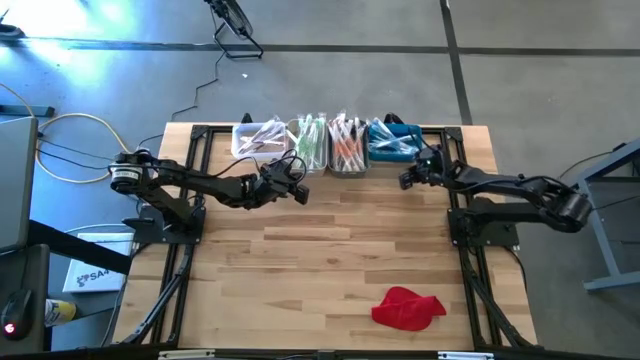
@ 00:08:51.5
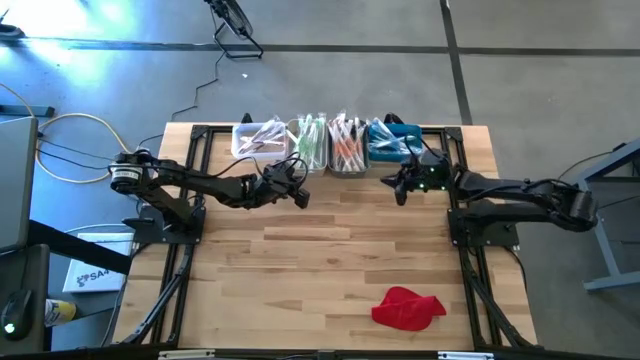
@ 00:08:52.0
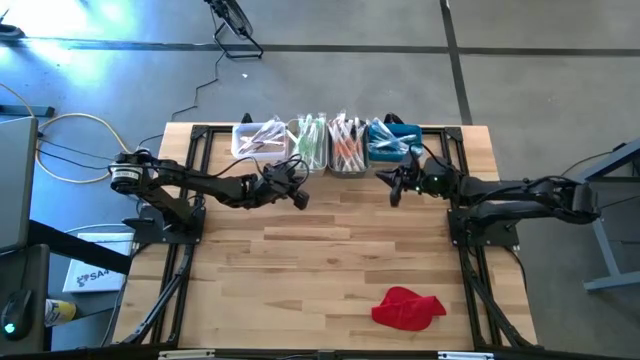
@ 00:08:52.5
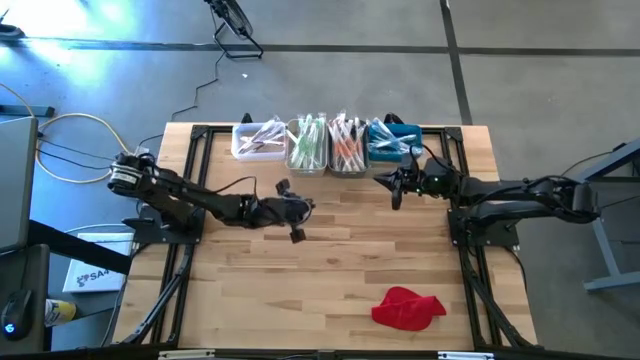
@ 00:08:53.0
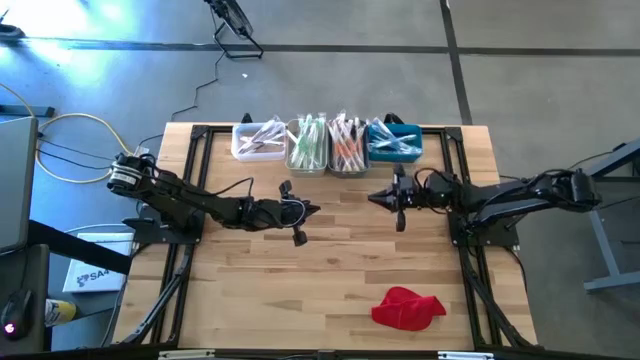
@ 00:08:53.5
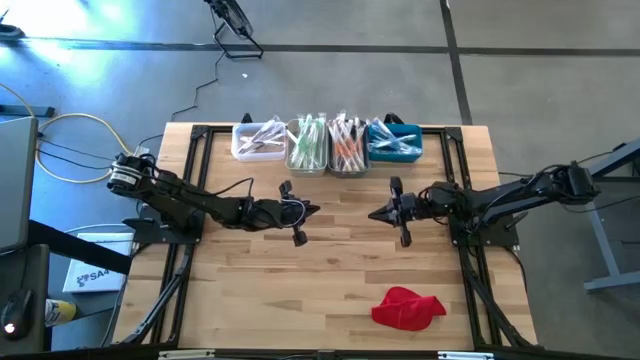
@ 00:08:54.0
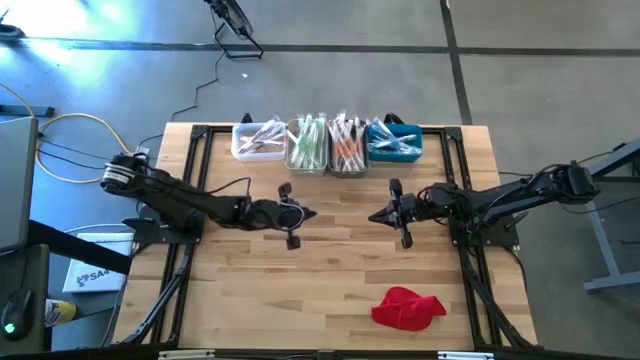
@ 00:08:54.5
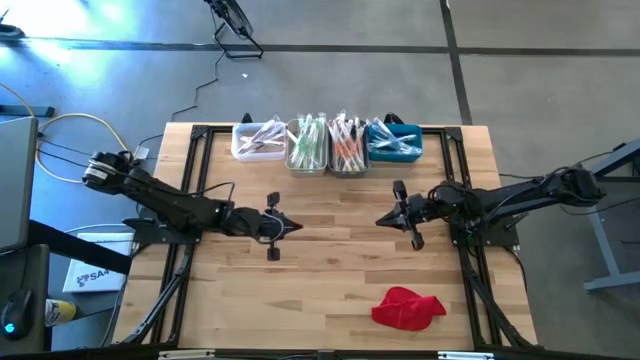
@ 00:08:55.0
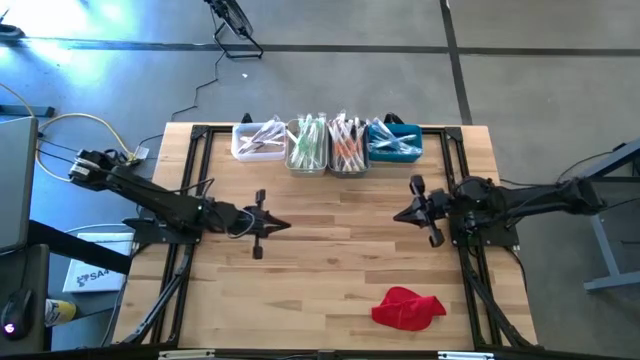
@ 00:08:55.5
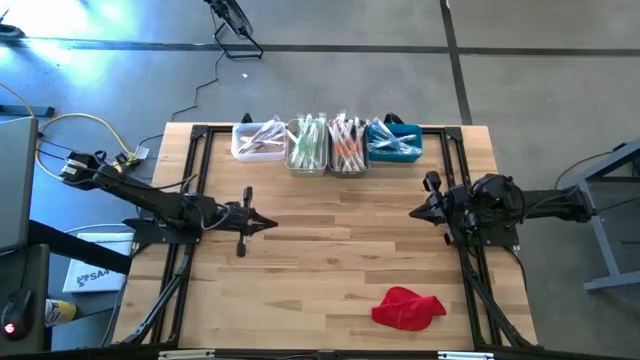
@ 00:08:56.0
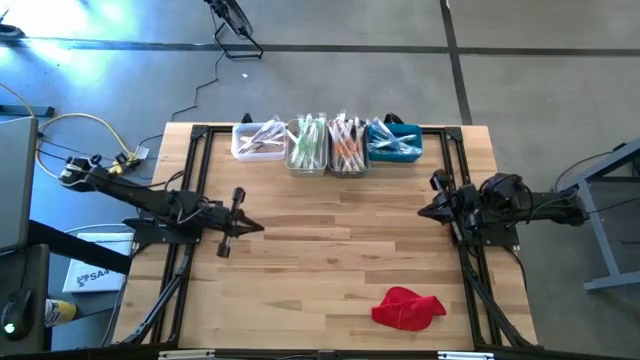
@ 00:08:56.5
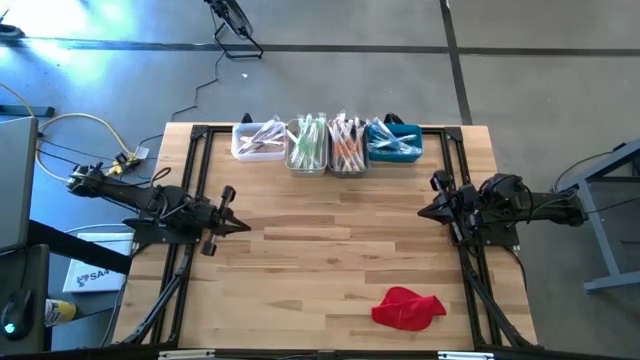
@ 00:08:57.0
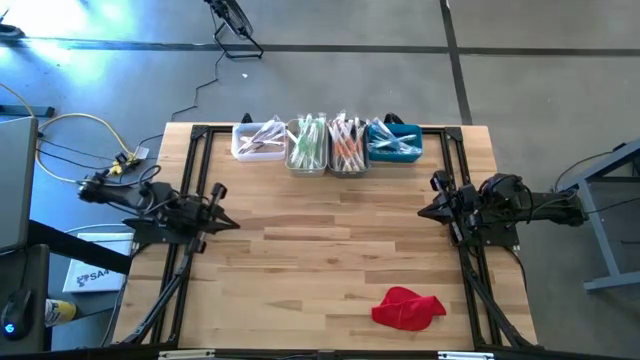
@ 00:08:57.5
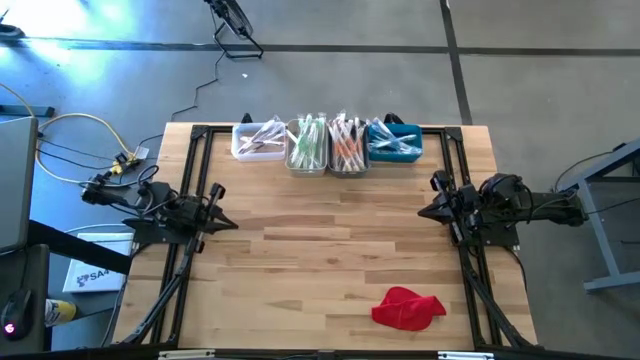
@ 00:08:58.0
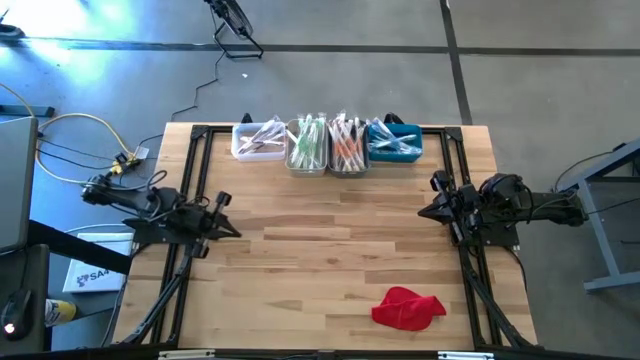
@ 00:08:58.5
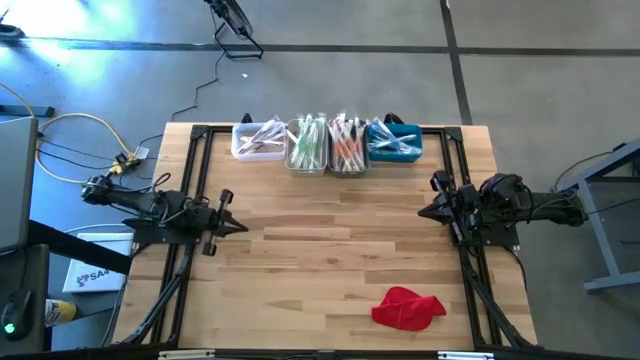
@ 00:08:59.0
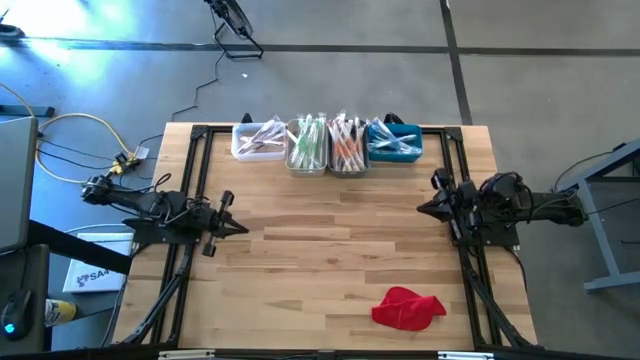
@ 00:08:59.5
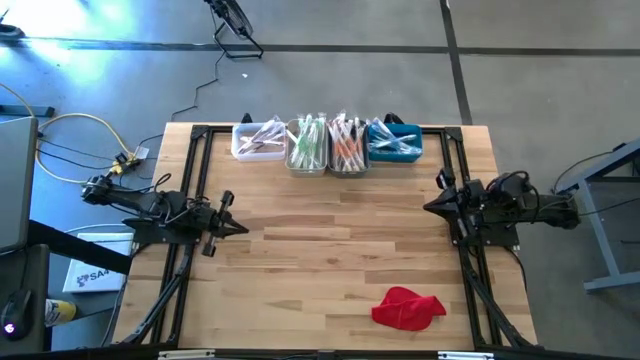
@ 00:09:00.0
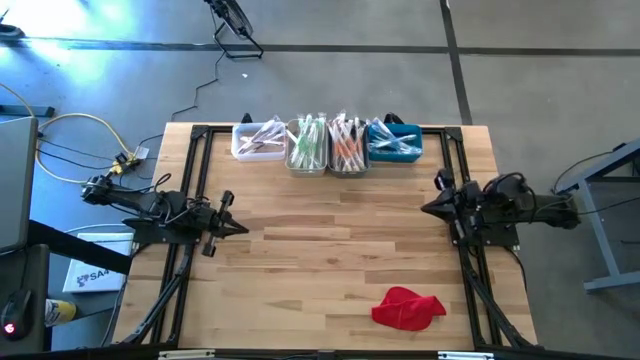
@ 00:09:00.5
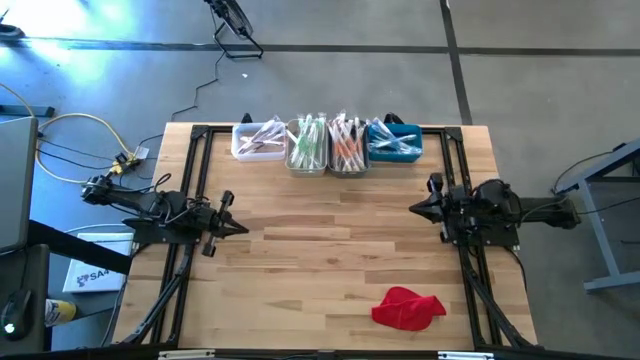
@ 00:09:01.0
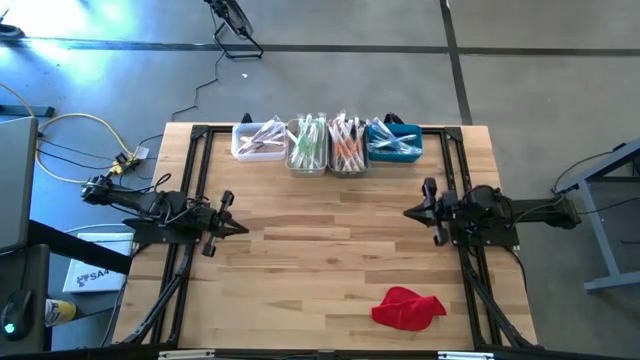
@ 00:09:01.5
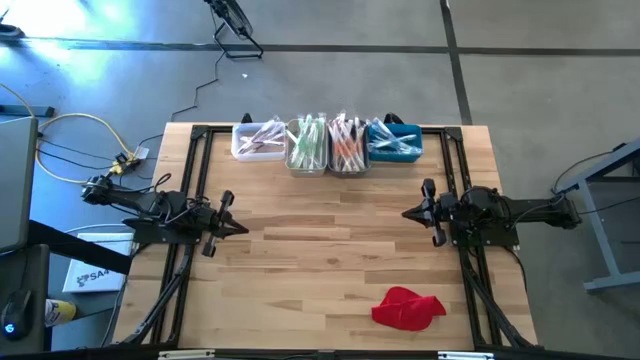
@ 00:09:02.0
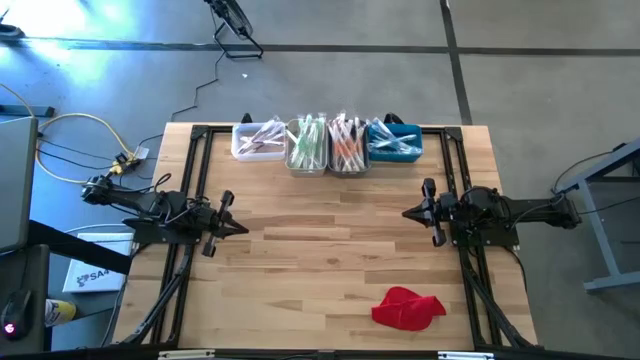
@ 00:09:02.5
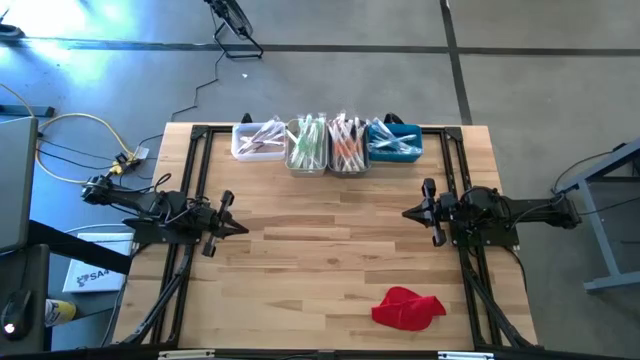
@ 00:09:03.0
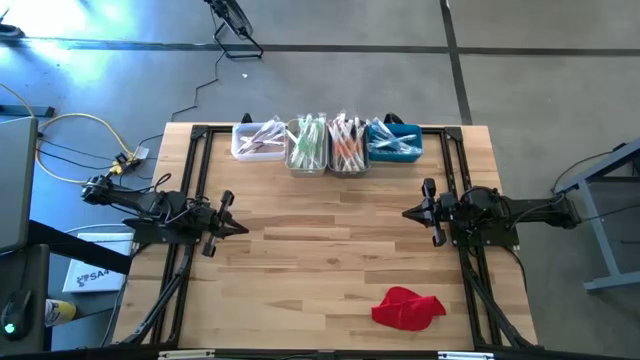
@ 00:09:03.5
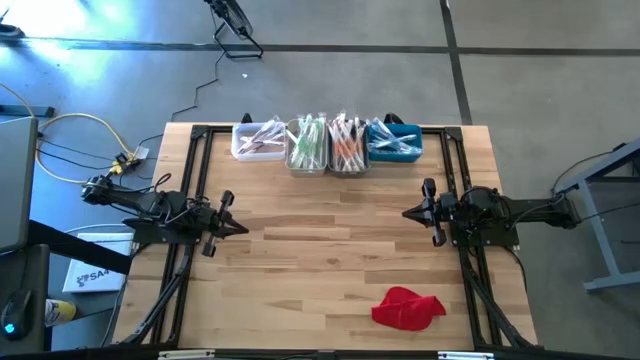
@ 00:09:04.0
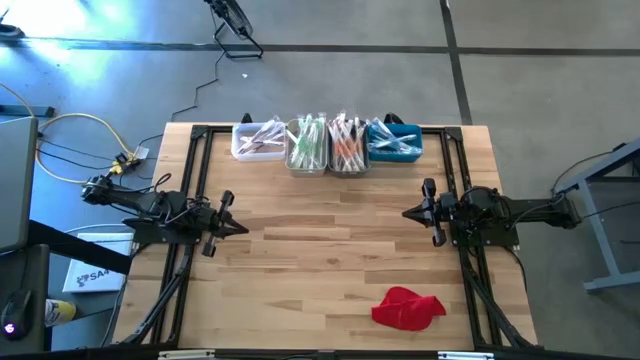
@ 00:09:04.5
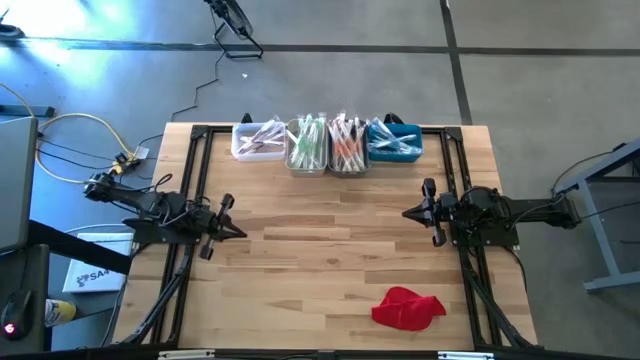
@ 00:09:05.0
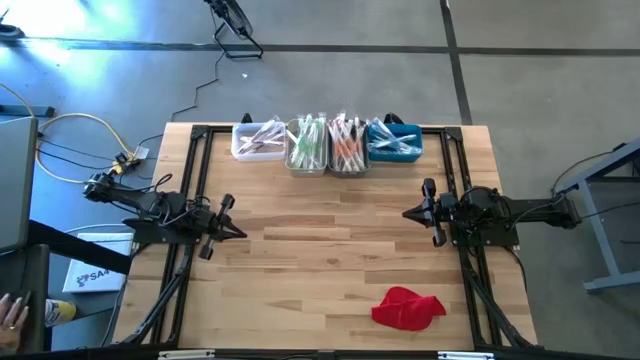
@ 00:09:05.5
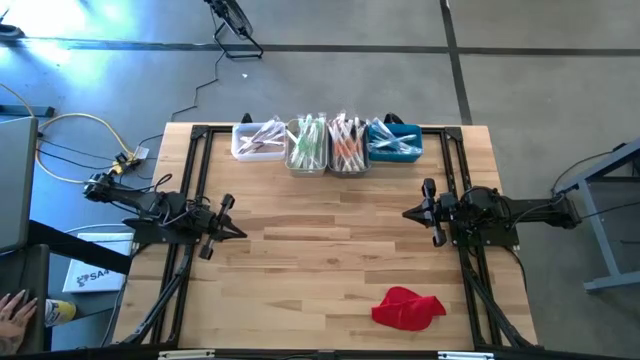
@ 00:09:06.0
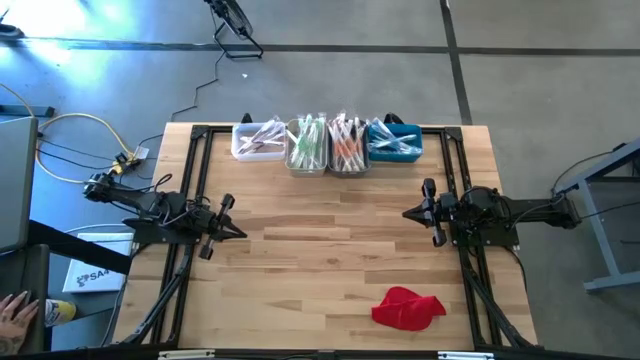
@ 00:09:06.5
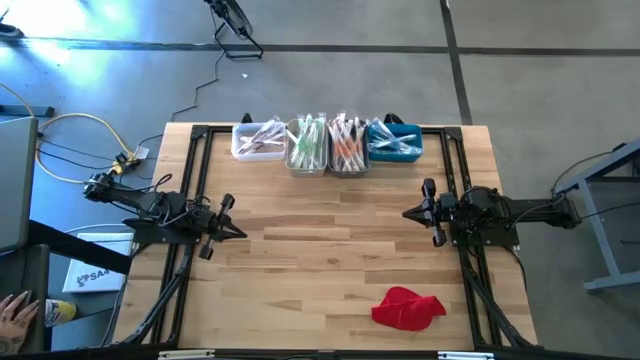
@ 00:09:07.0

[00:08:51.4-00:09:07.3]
Task: Pick & Place Toothbrushes
Return to Home Position

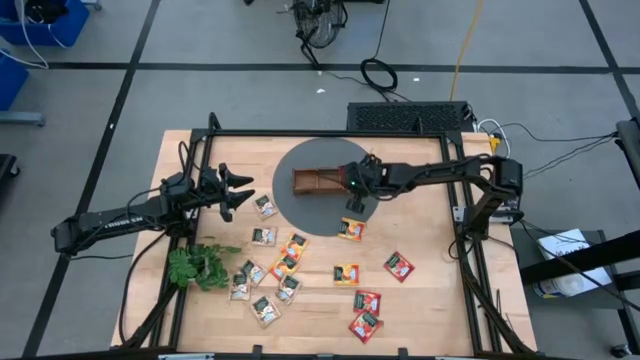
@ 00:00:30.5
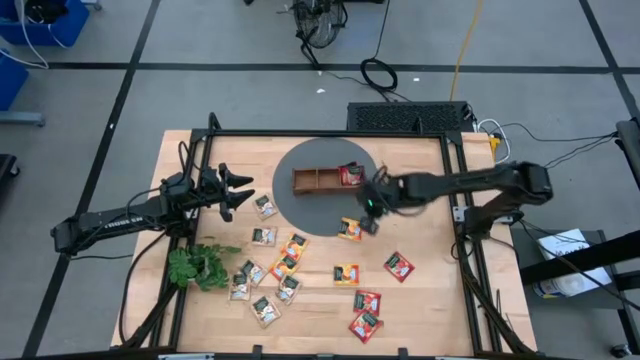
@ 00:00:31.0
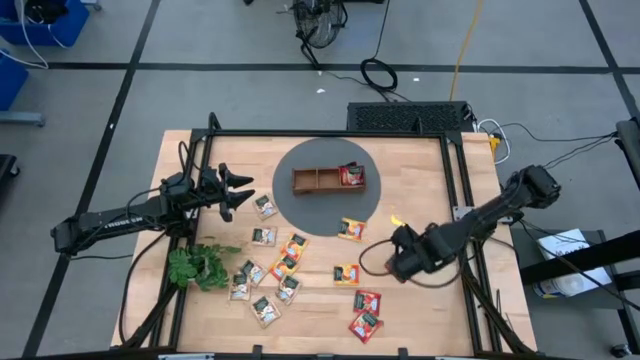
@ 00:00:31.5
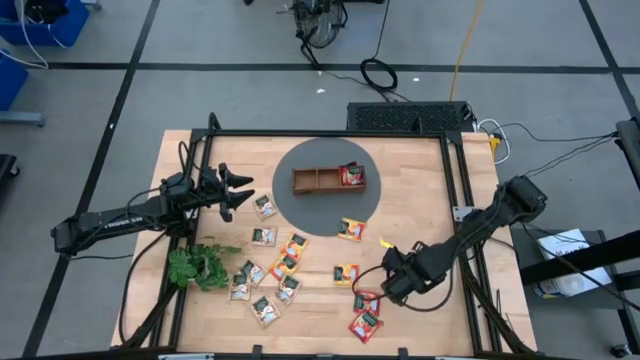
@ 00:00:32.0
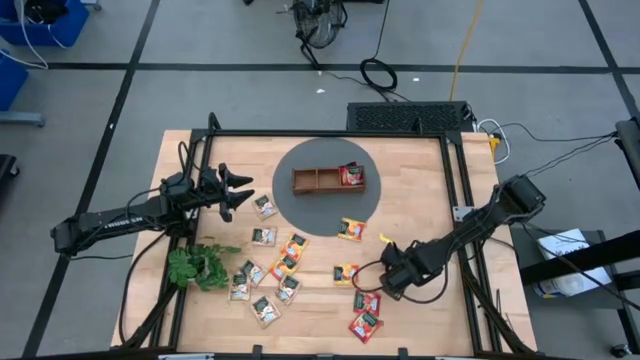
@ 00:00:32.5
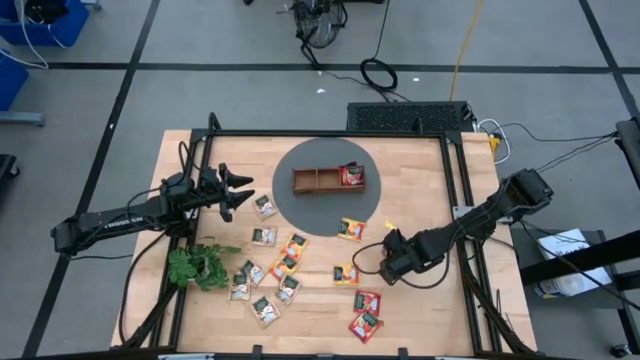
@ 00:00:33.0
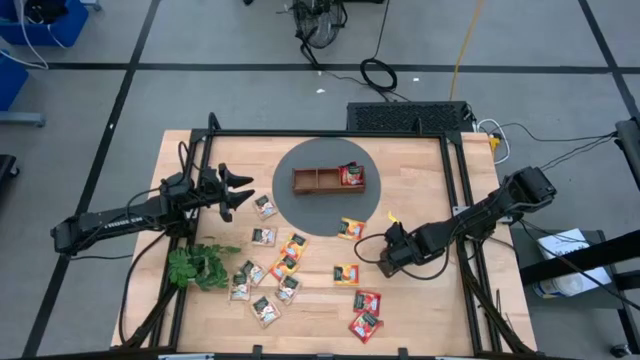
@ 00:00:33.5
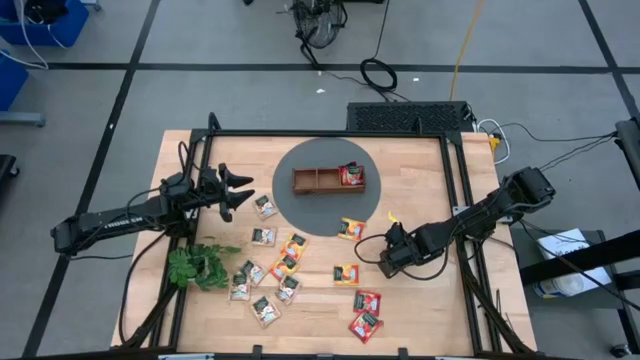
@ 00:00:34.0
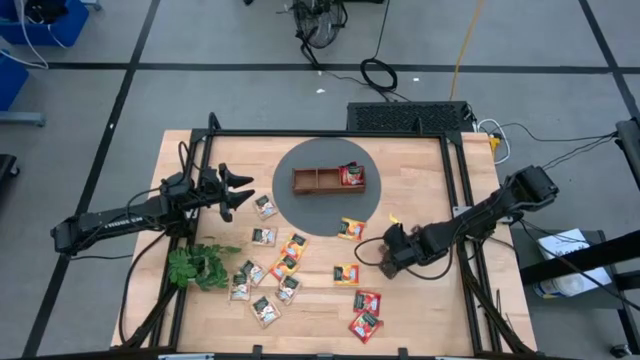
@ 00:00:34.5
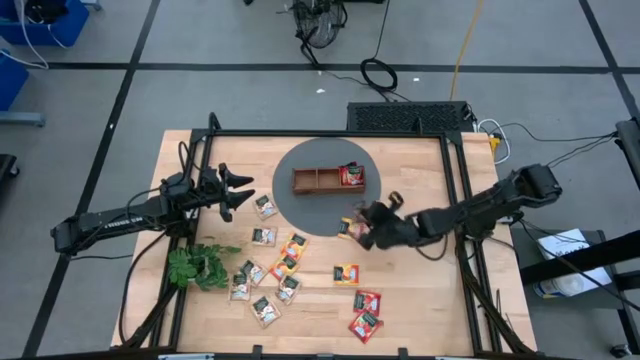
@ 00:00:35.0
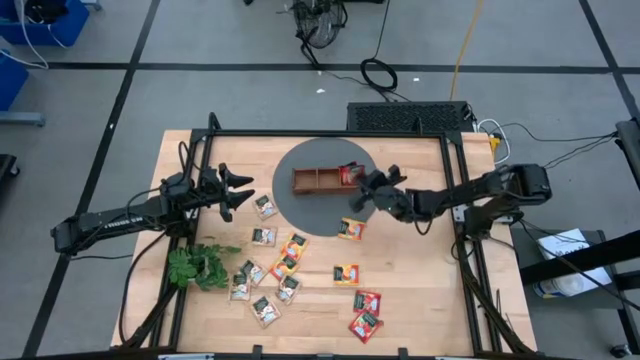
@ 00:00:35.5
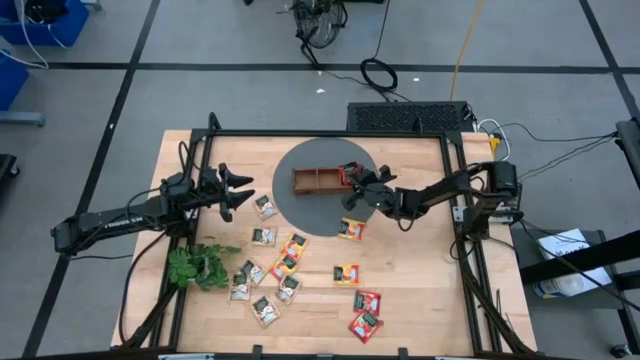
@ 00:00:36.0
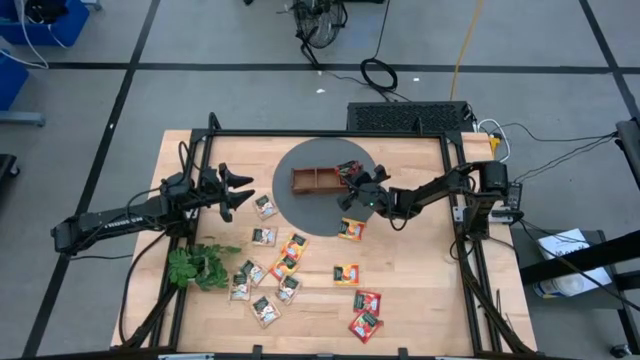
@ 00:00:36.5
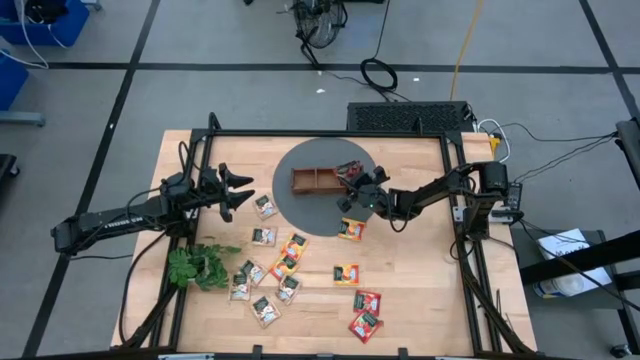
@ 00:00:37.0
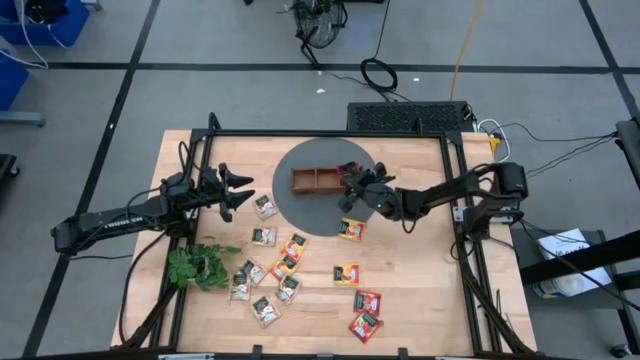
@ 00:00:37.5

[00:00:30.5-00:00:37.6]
Task: Pick & Place Tea
Put the red tea bag into the right section of the wooden organizer
